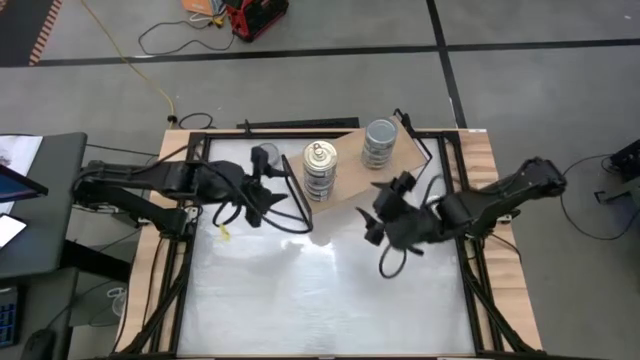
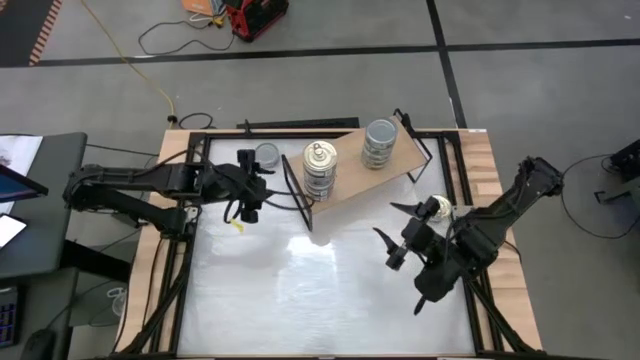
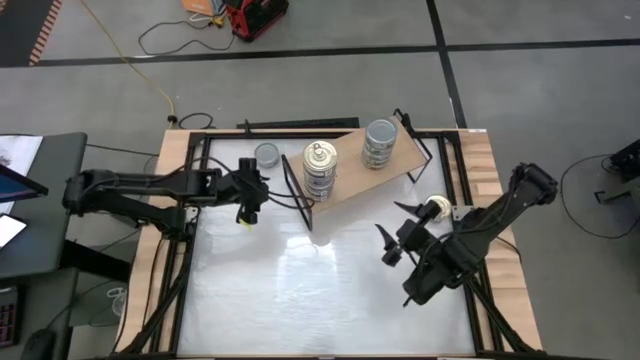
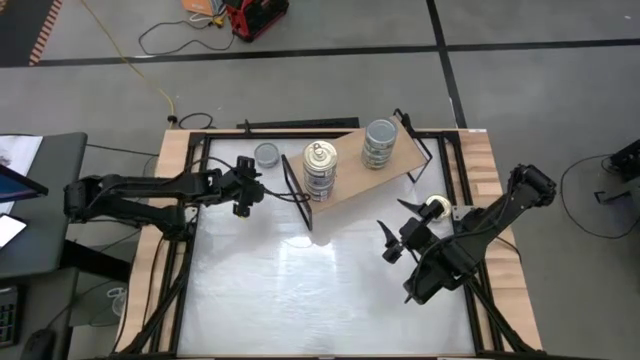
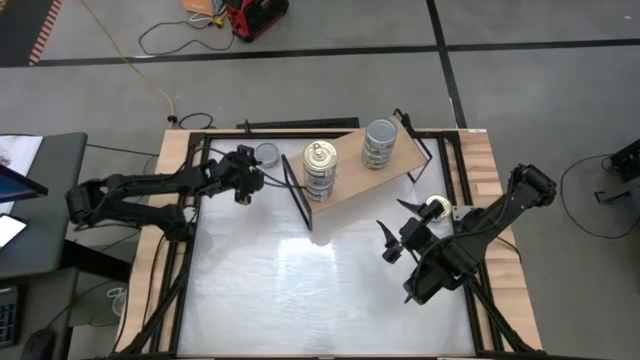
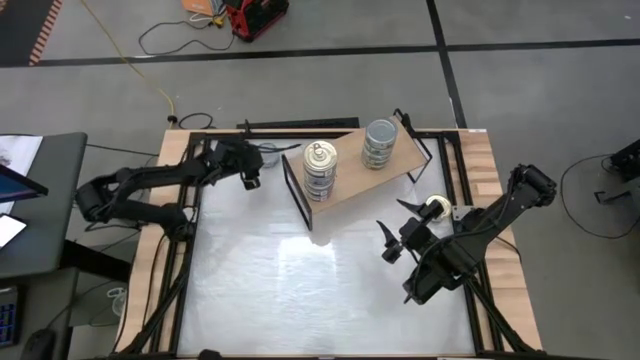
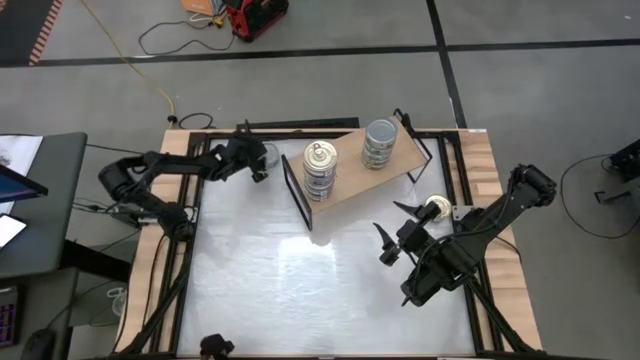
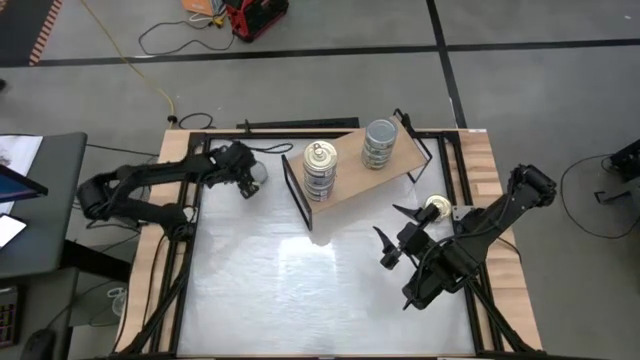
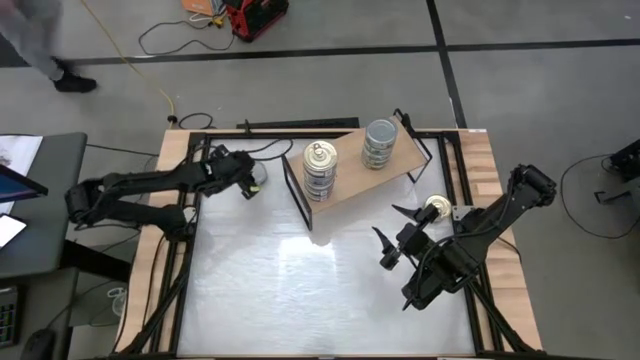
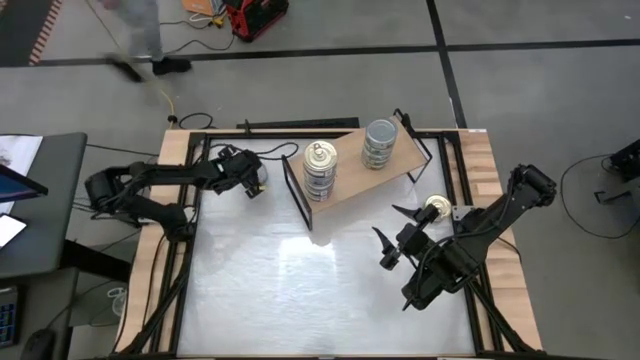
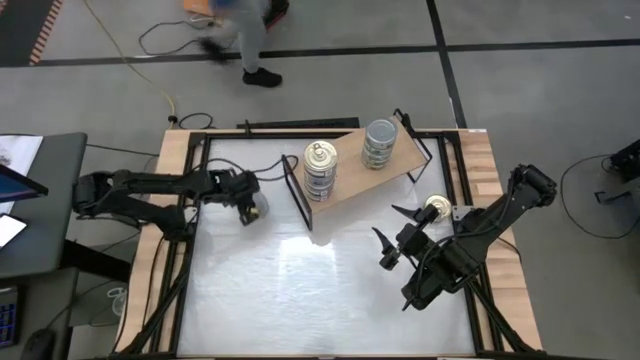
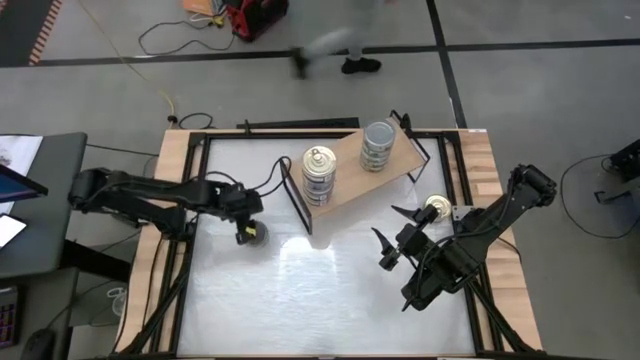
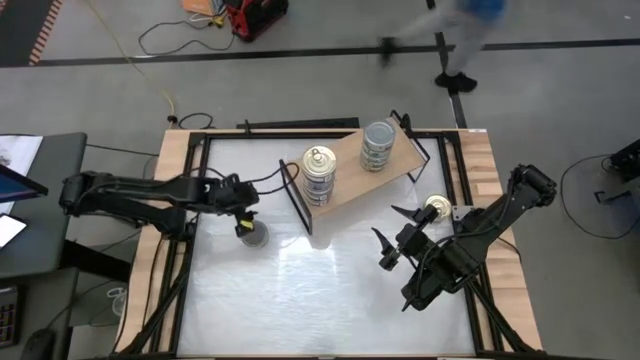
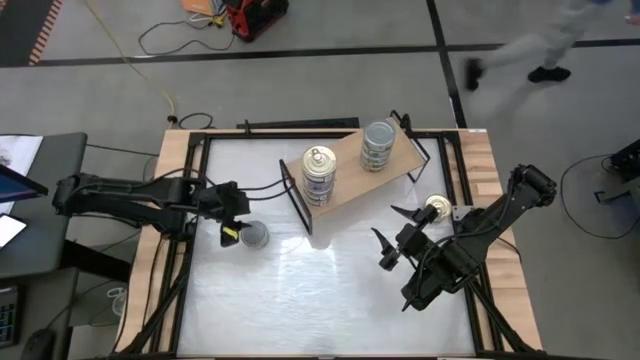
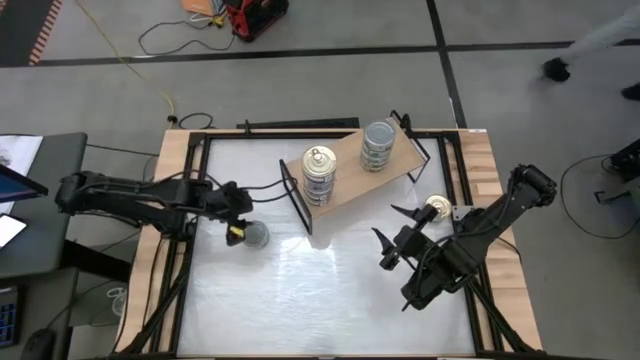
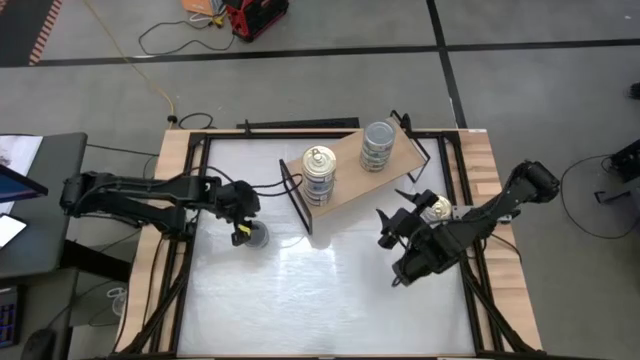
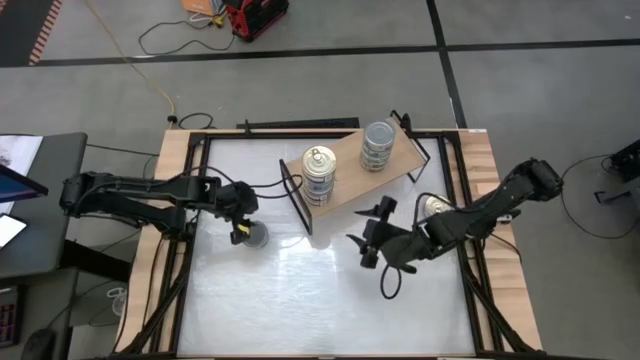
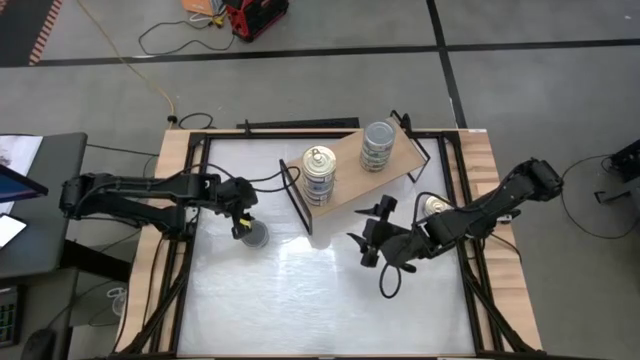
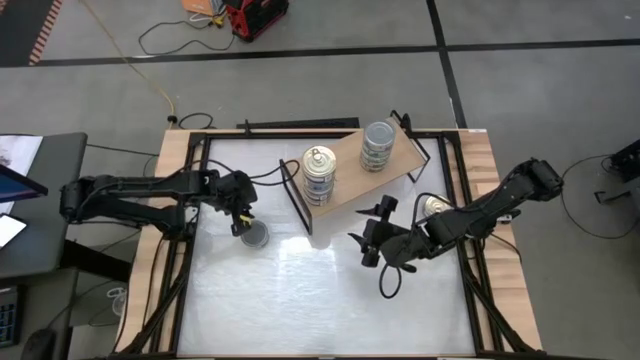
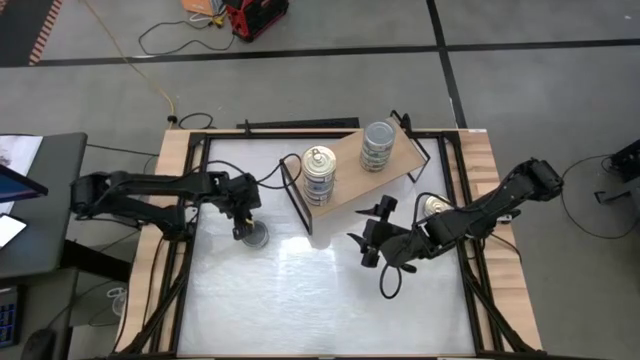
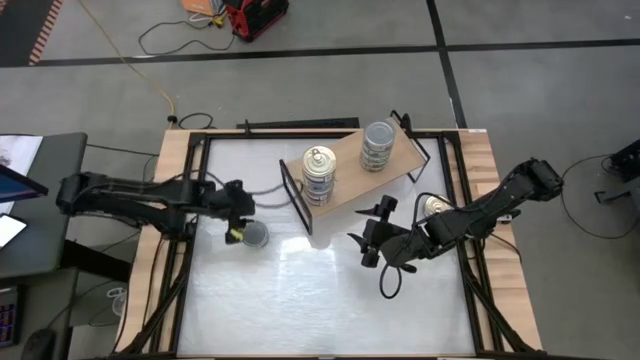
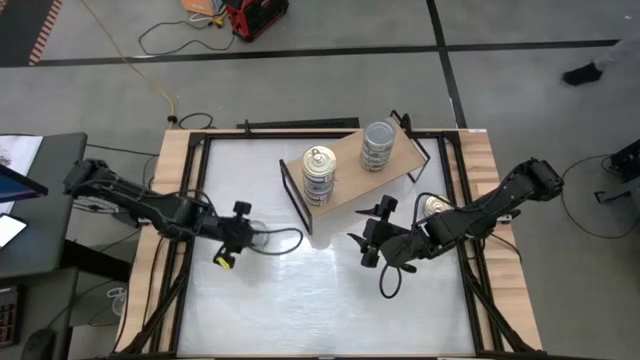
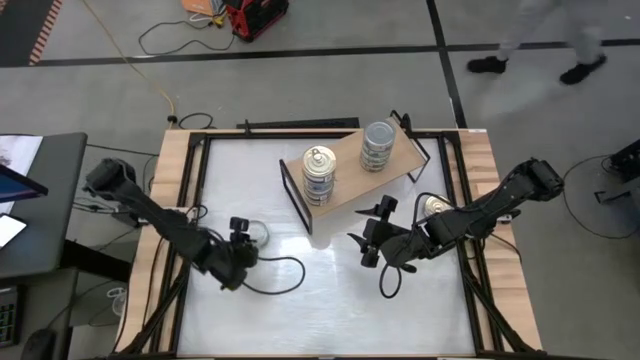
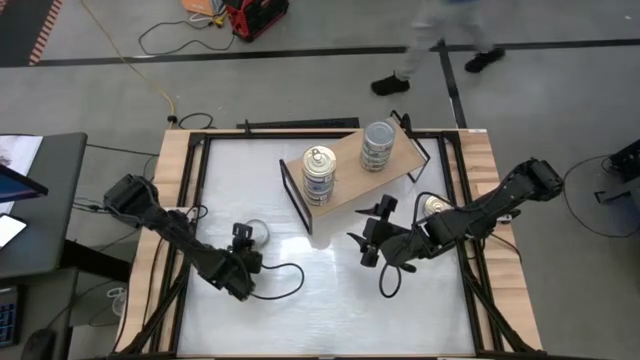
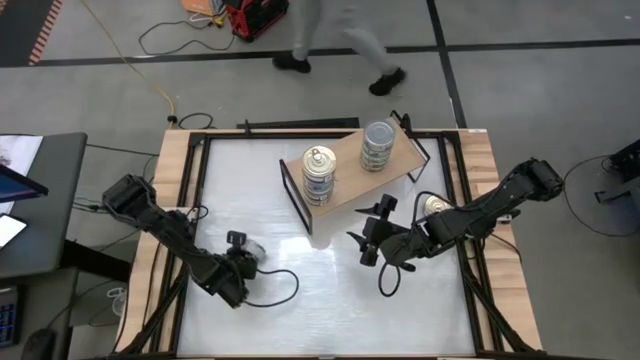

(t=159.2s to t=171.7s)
Task: Stack canned seafood by type on shelf
Stack the green tuna can on top of the green tuna can

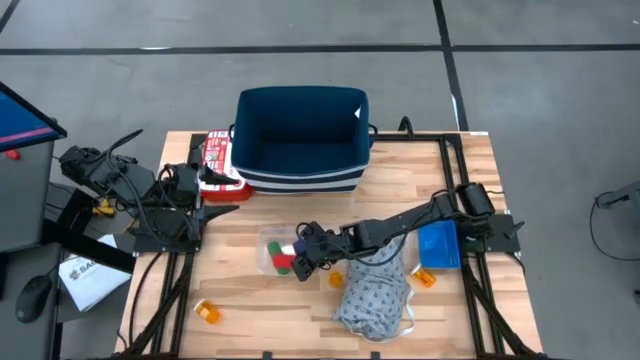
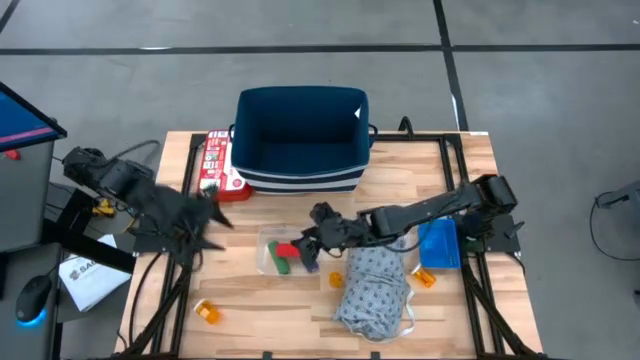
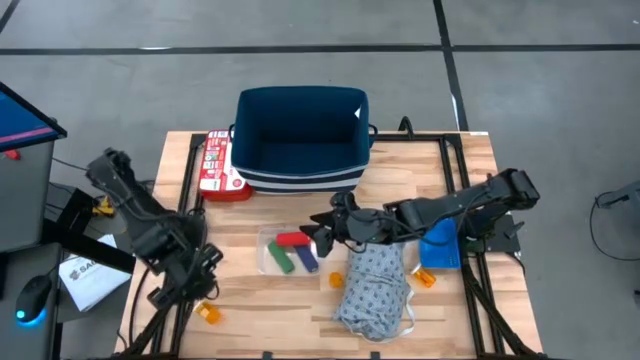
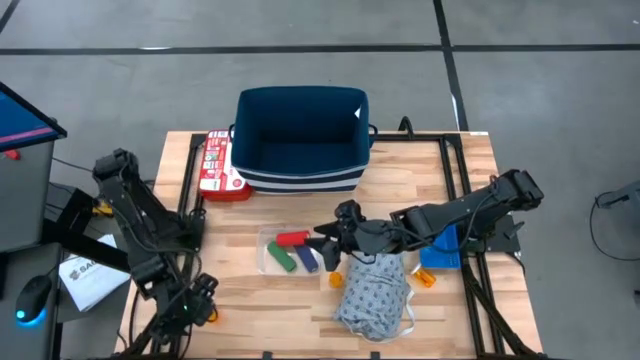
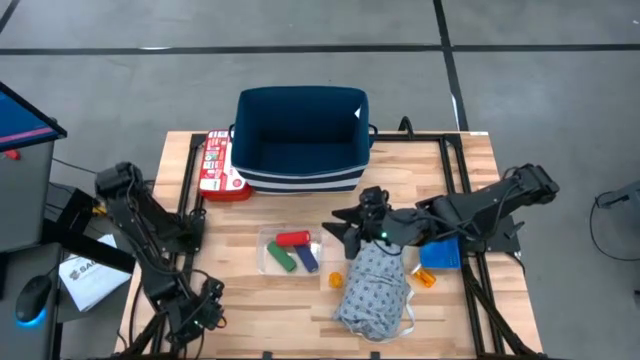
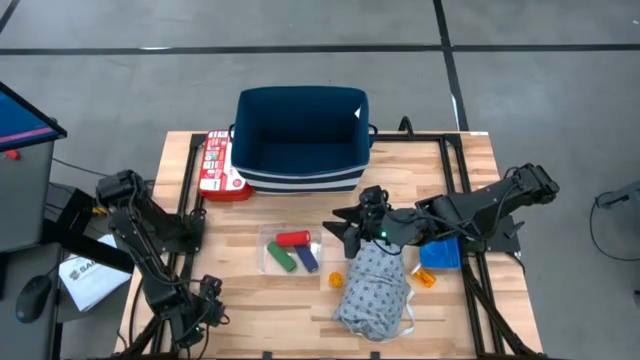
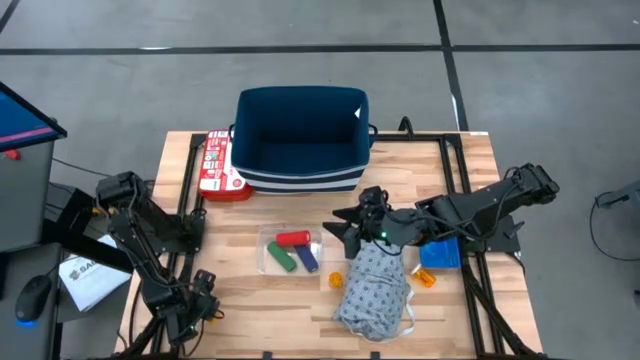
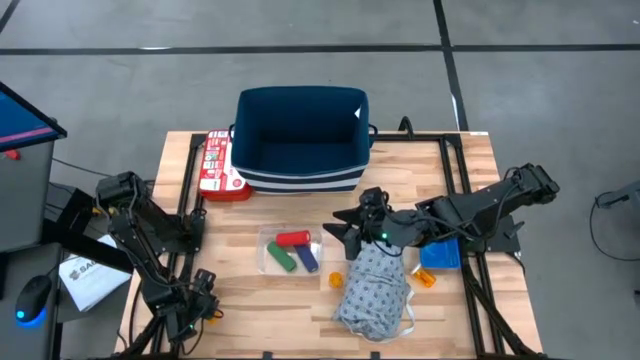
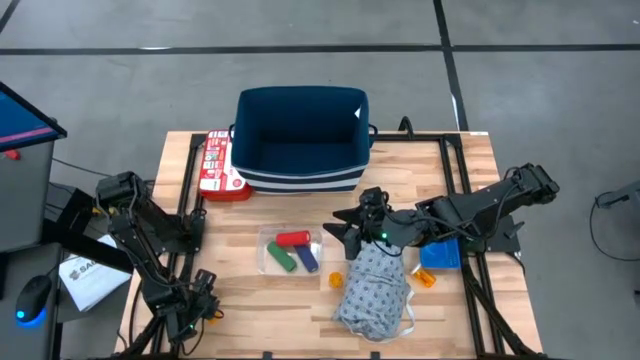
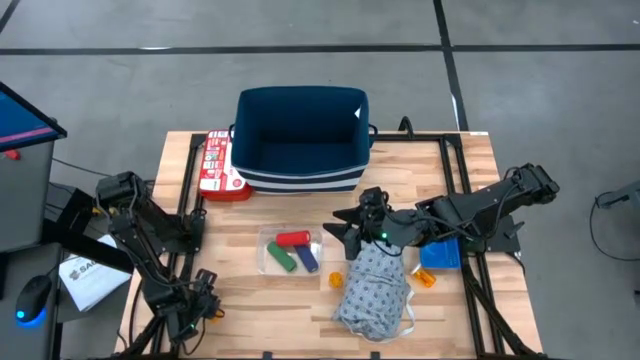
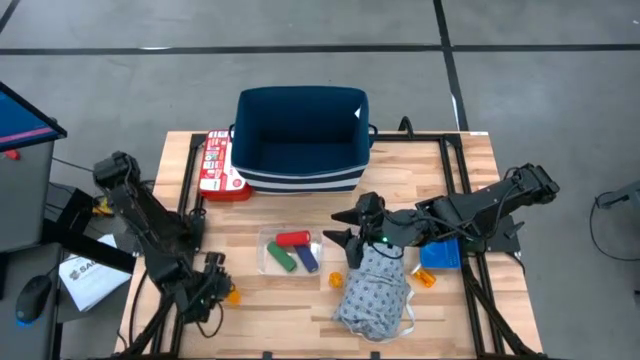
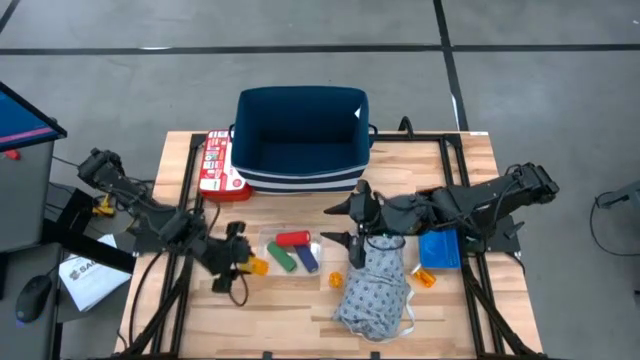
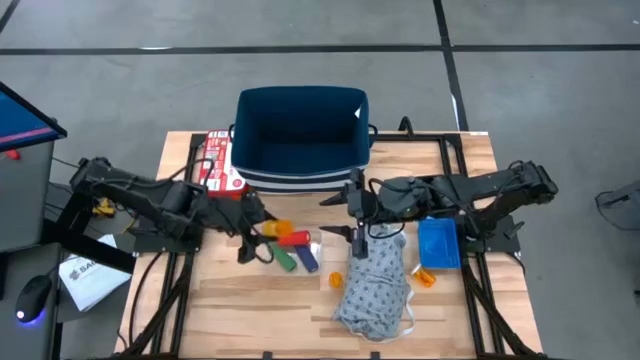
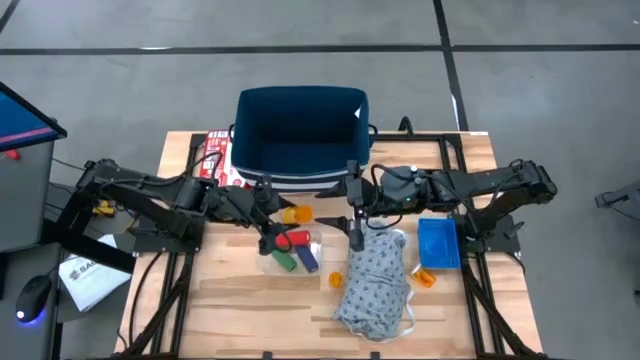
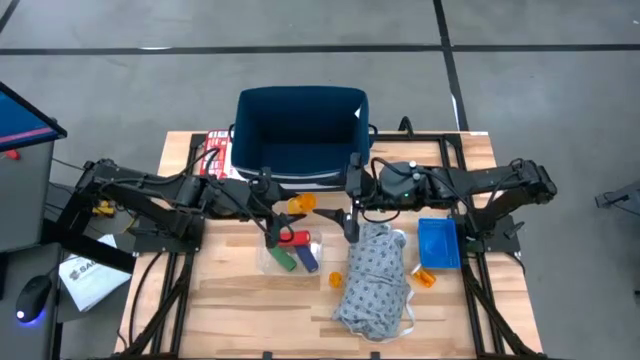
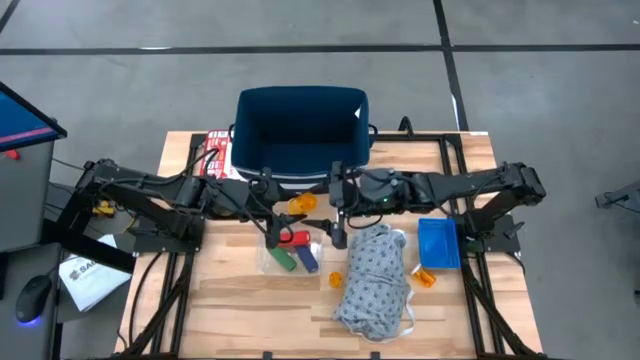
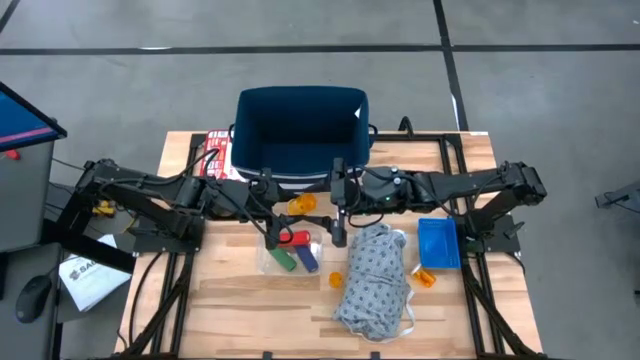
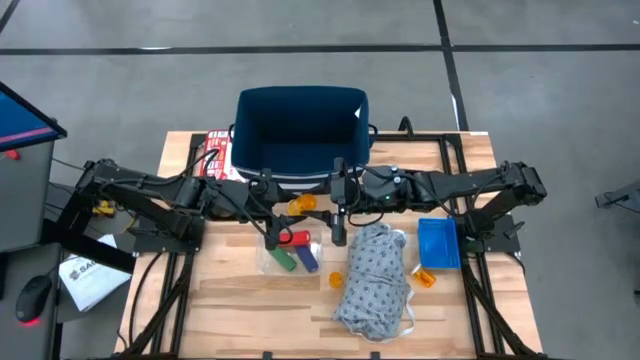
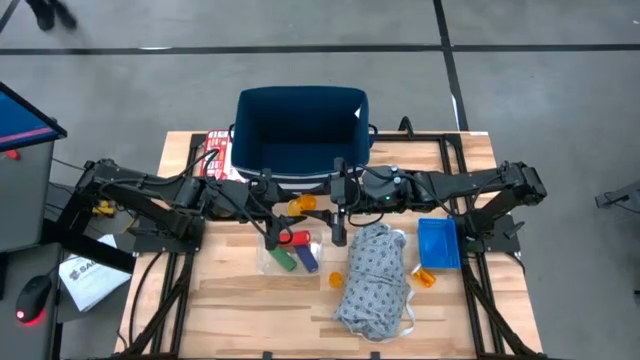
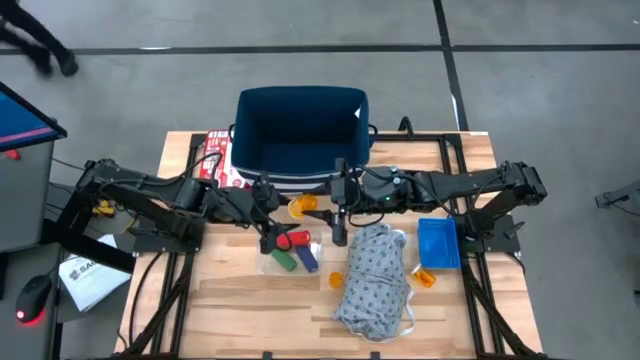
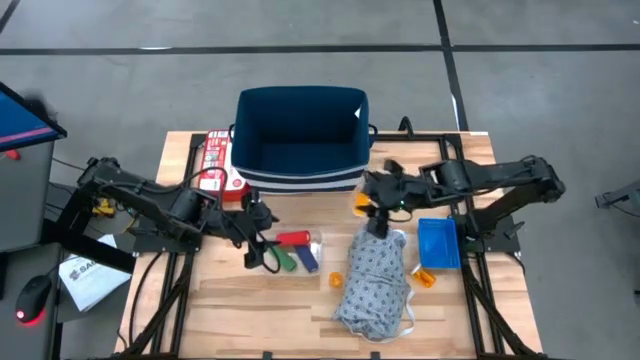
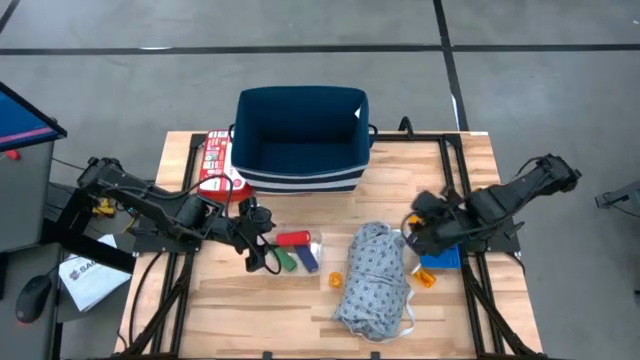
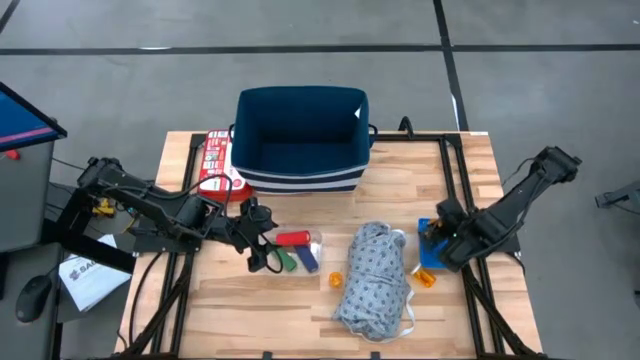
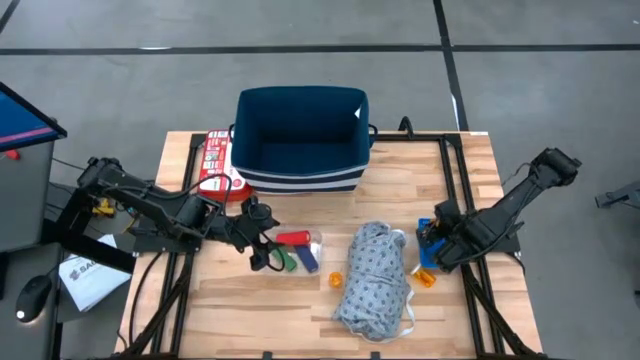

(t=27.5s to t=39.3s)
Task: Pick & place medical supplies in basket/bin
Put the left orange pill bottle into the small blue bin
